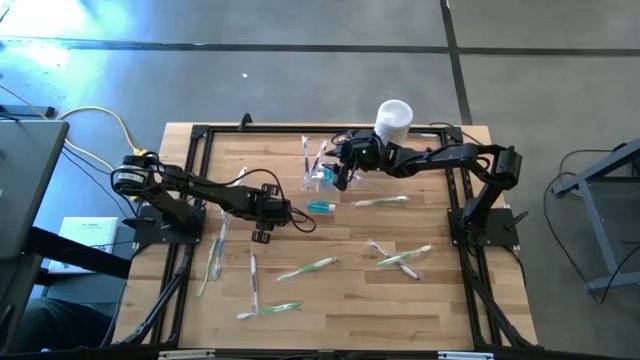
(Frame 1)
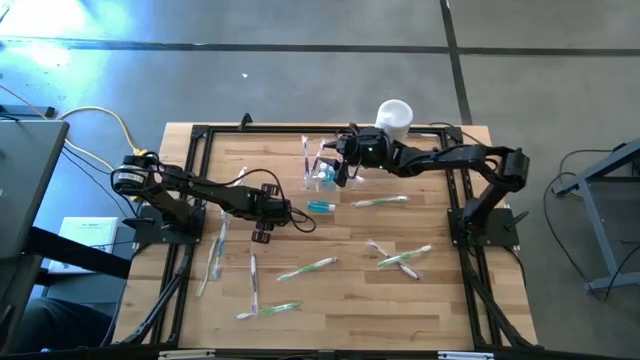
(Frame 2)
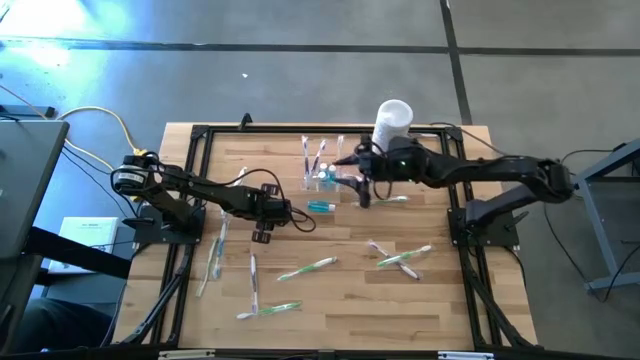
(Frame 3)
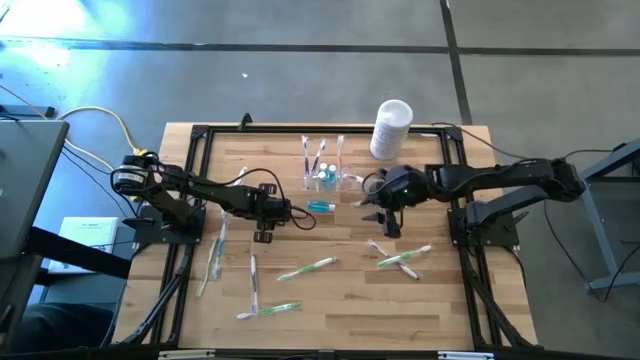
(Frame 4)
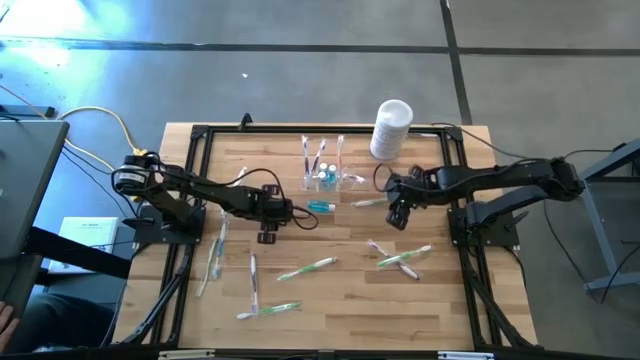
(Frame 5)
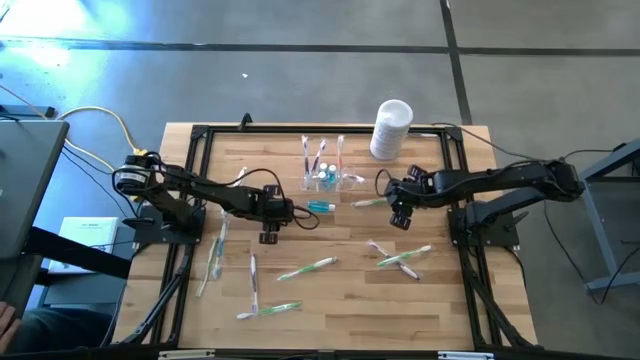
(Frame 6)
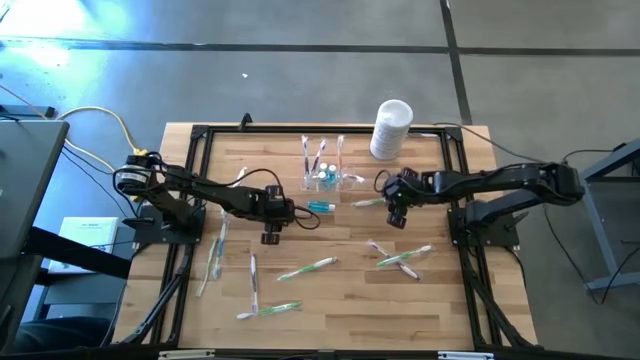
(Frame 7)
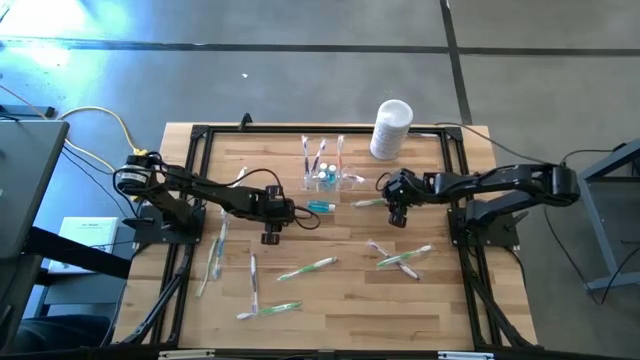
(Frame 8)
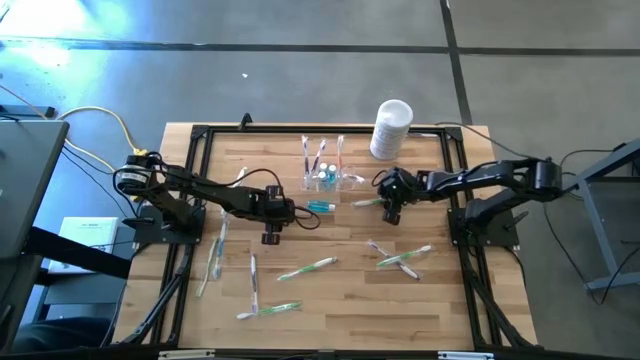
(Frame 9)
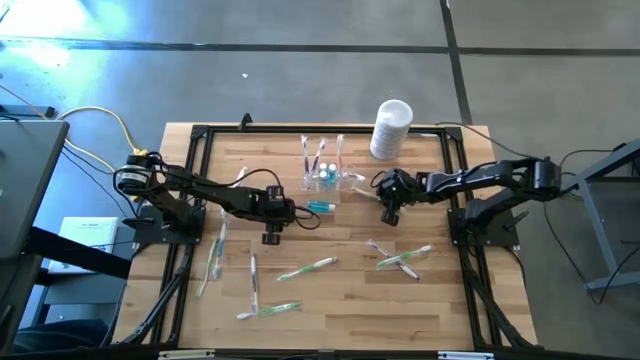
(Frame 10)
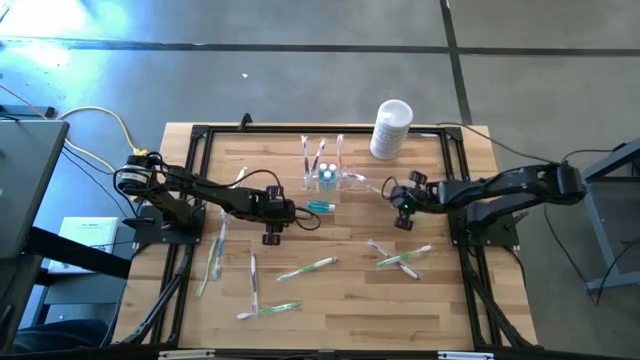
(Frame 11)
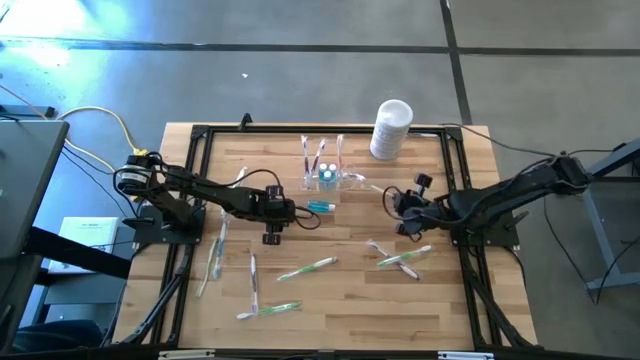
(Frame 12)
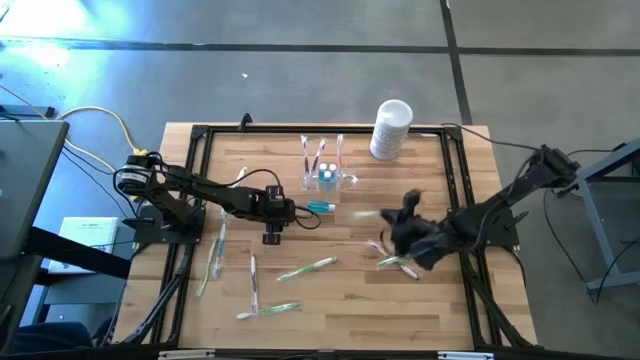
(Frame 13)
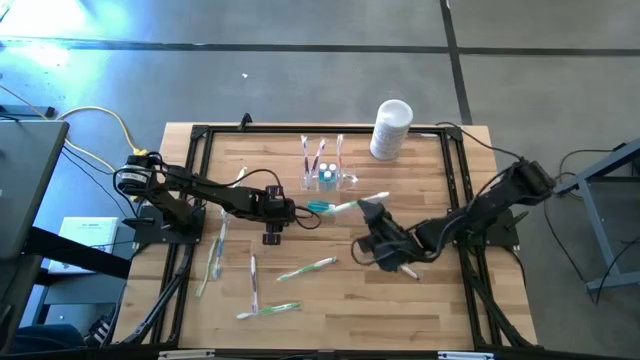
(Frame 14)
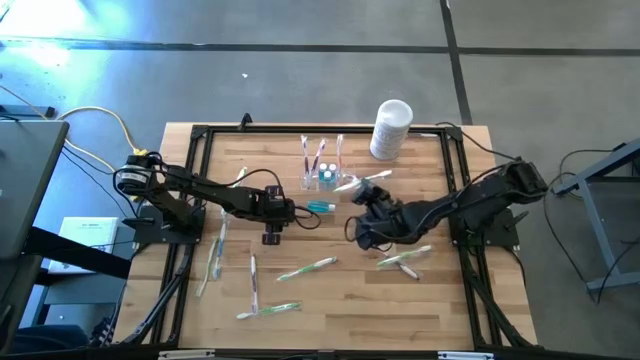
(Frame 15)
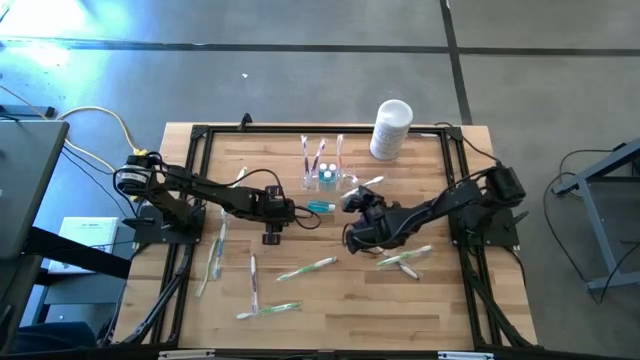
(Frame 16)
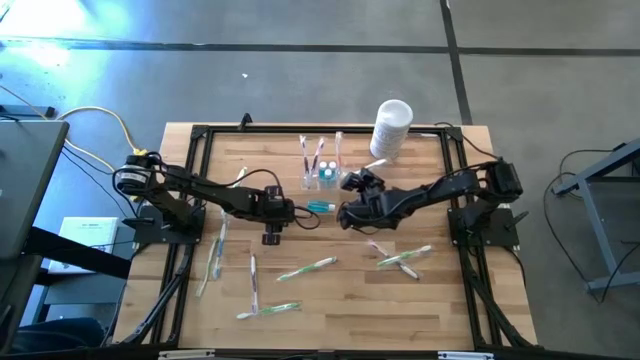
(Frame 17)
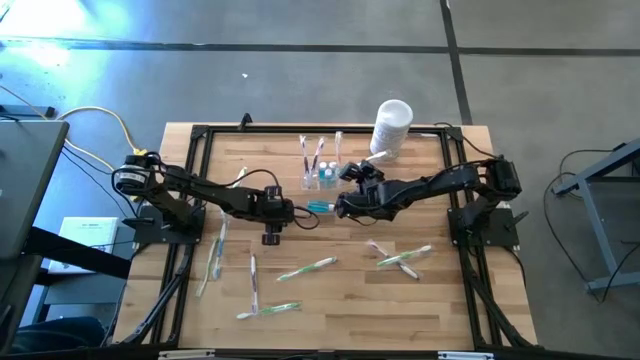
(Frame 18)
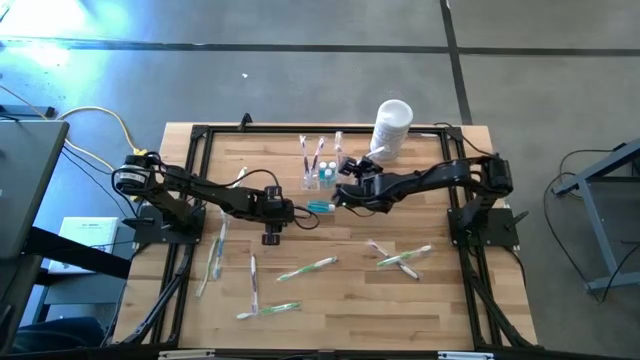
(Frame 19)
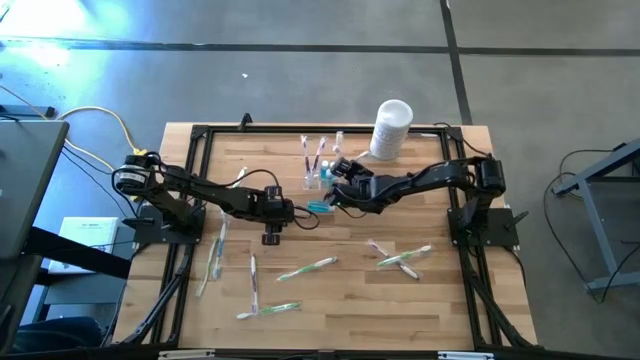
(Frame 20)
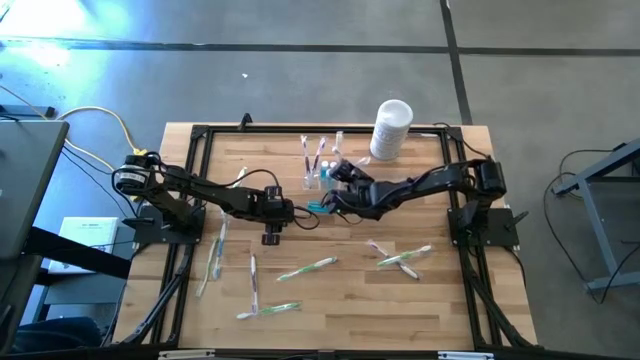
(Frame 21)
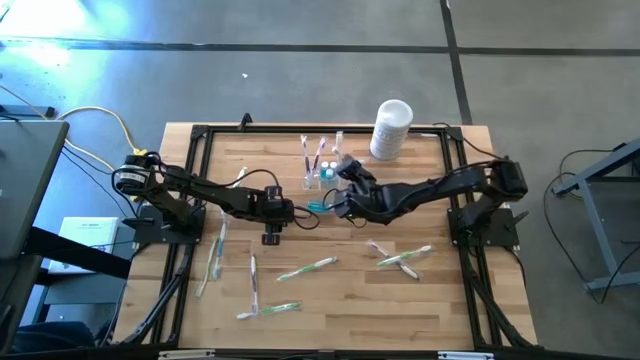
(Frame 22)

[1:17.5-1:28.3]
Task: Pick & Place toothbrushing station
Put the green toothbrush into the transparent organizer

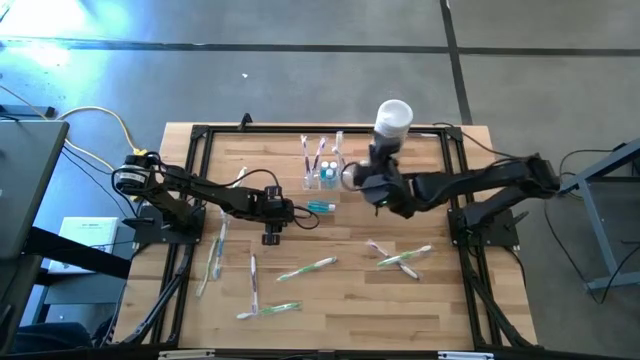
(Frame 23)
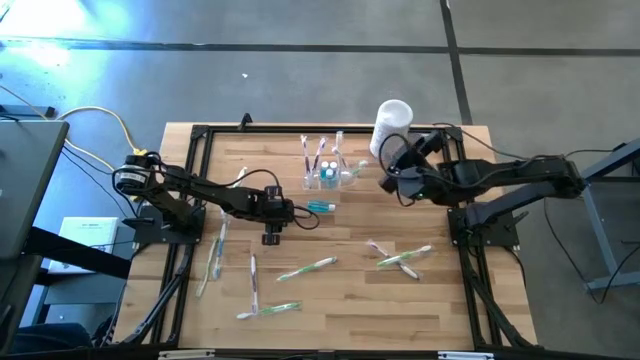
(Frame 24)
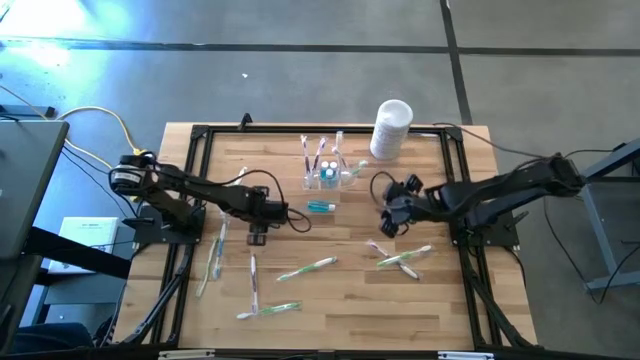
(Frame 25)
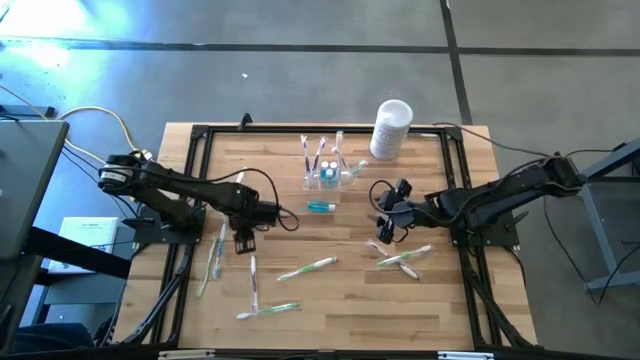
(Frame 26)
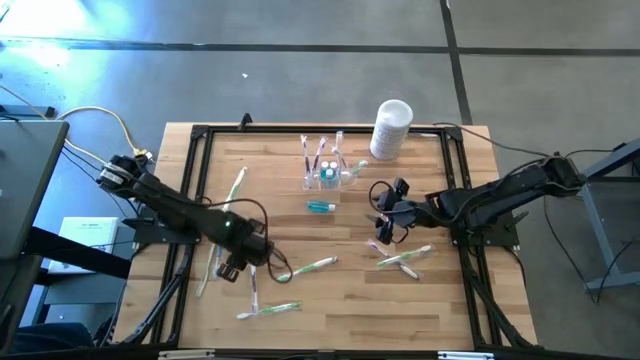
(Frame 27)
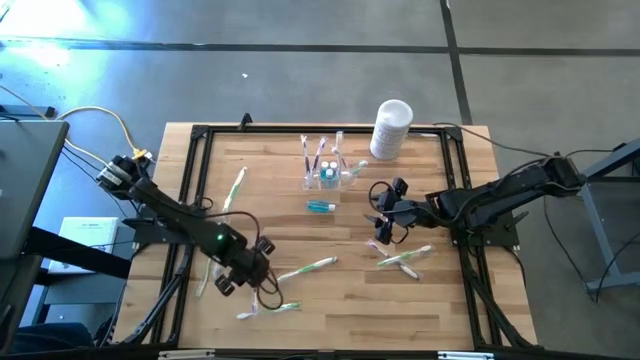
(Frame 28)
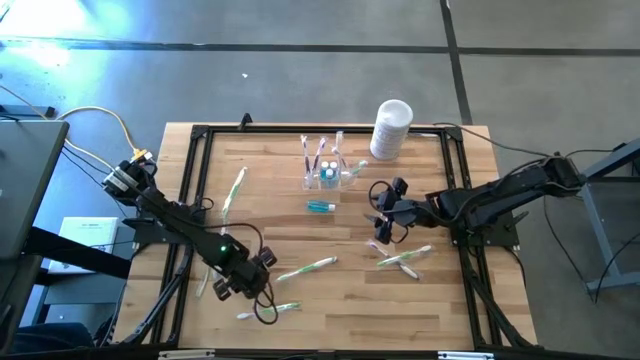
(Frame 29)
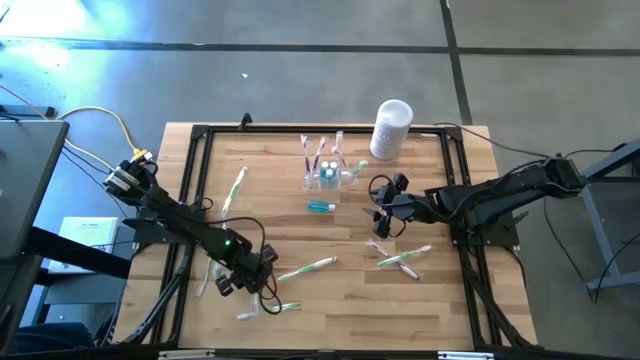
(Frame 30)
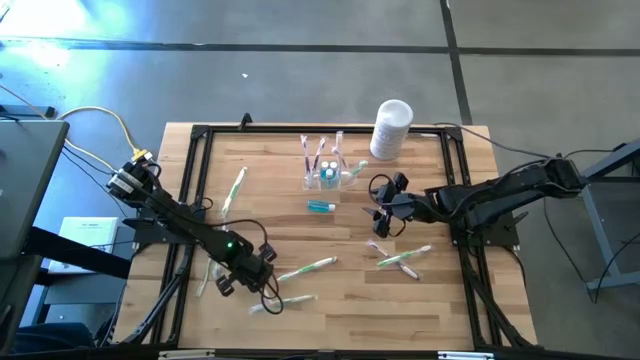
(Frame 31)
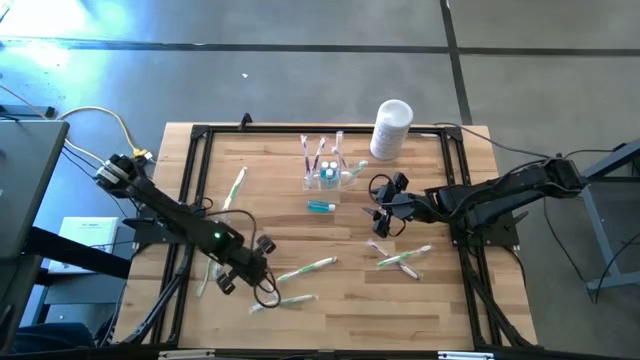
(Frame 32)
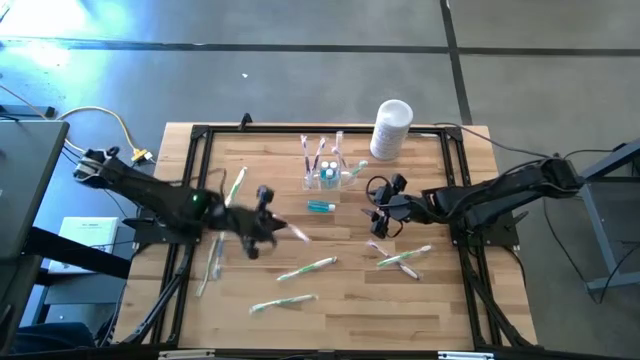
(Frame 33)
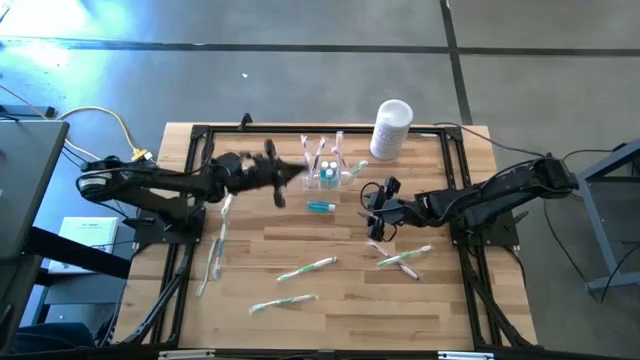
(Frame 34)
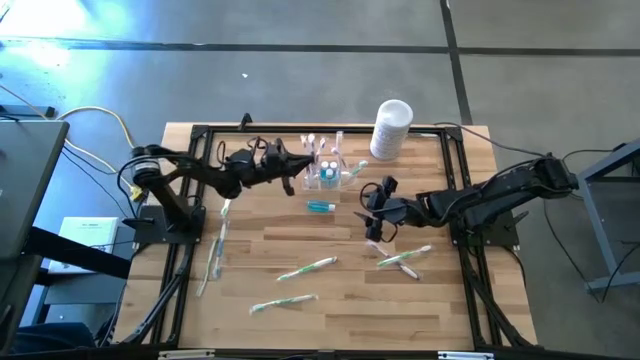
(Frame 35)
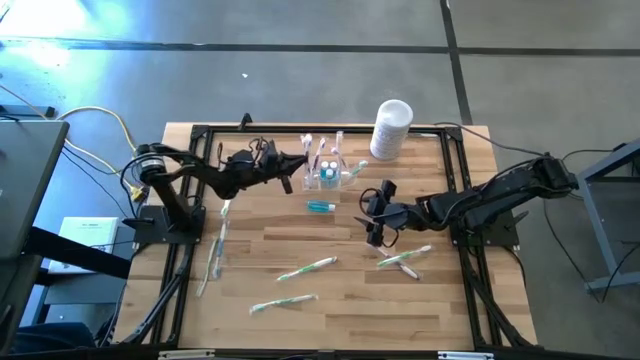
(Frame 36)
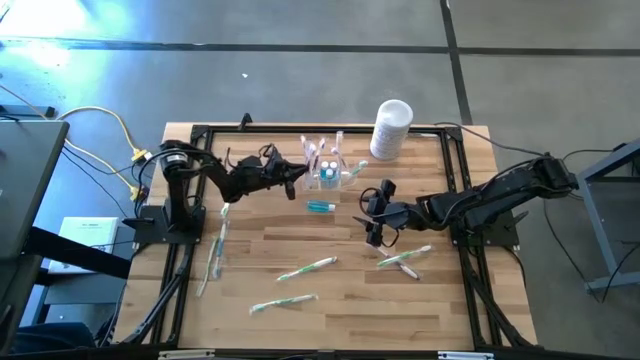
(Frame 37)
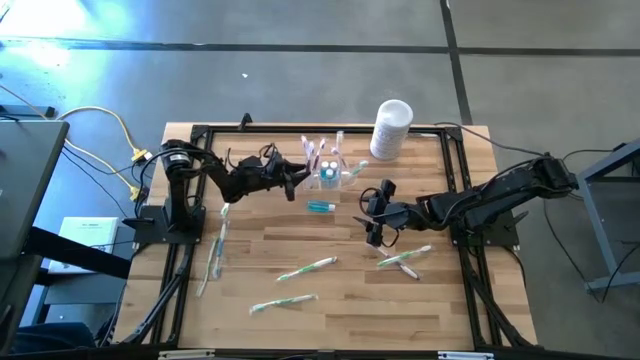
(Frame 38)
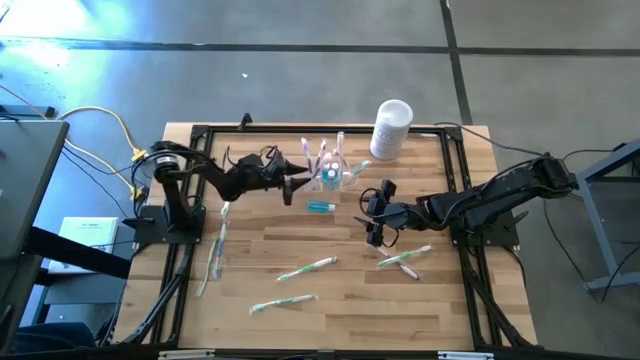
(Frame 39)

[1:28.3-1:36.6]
Put the left purple toothbrush into the transparent organizer

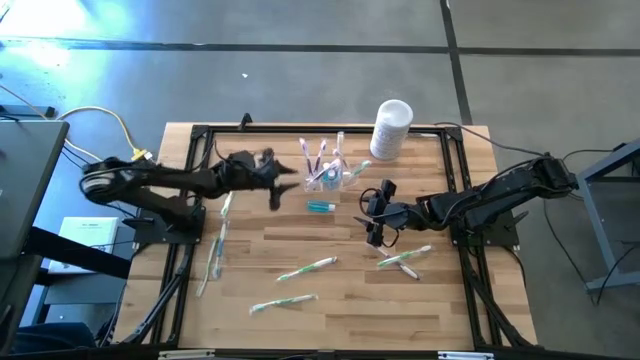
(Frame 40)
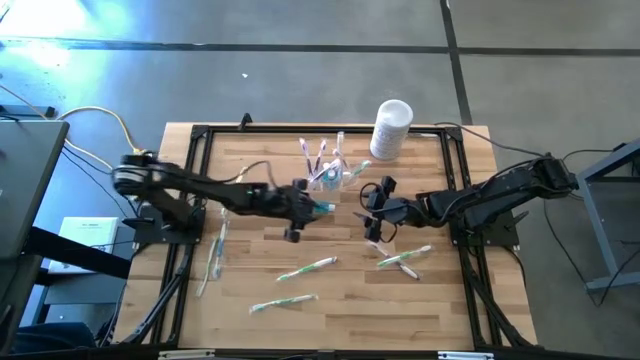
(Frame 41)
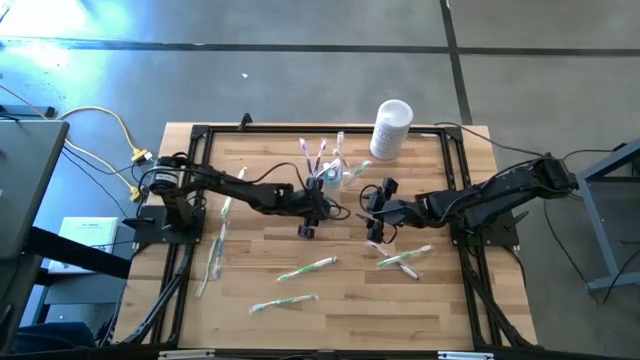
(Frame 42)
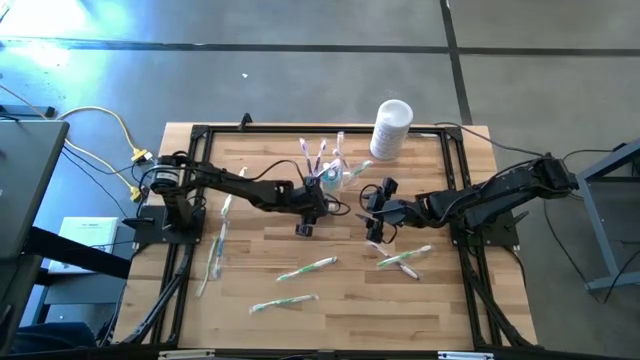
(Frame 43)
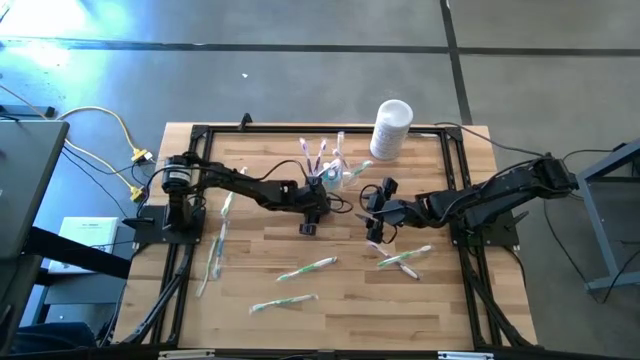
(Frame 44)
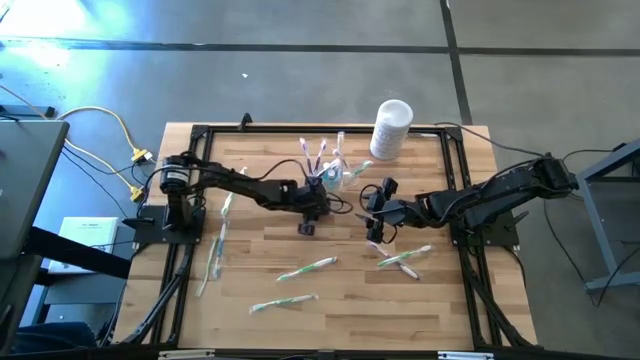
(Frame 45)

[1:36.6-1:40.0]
Put the blue mouthwash into the transparent organizer
